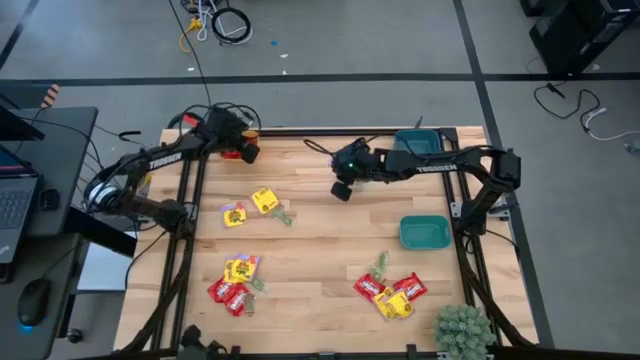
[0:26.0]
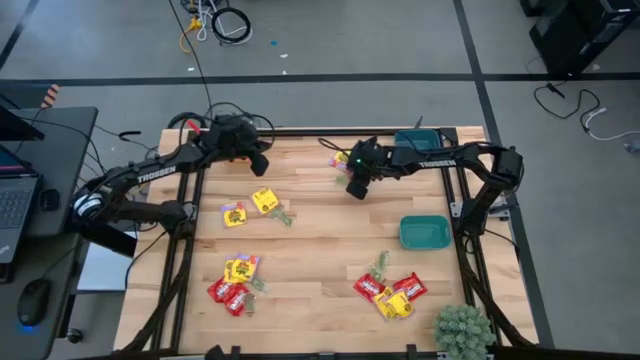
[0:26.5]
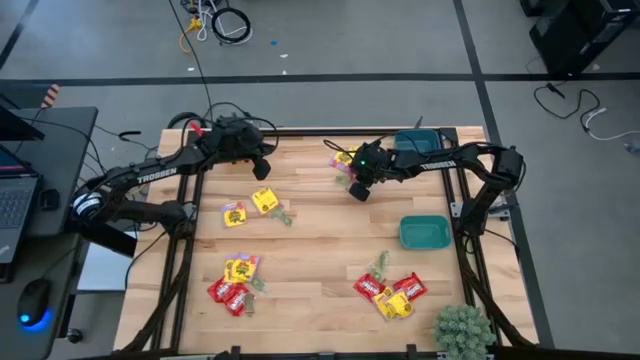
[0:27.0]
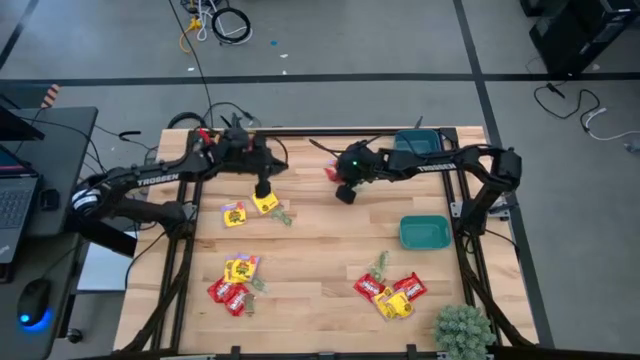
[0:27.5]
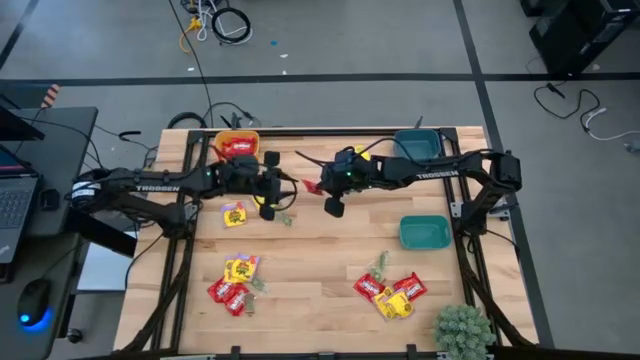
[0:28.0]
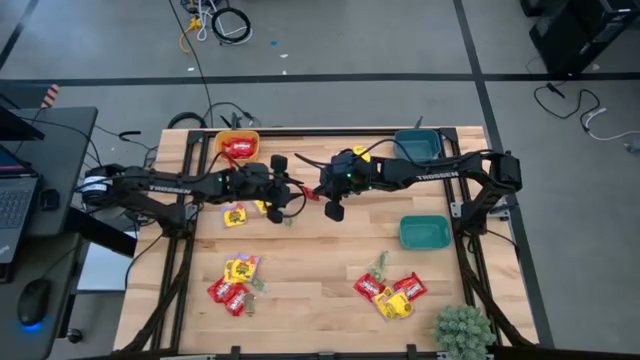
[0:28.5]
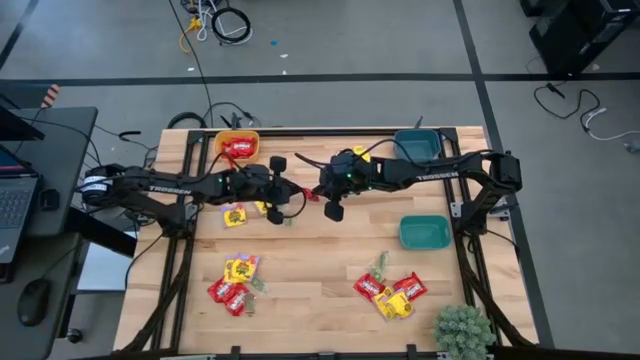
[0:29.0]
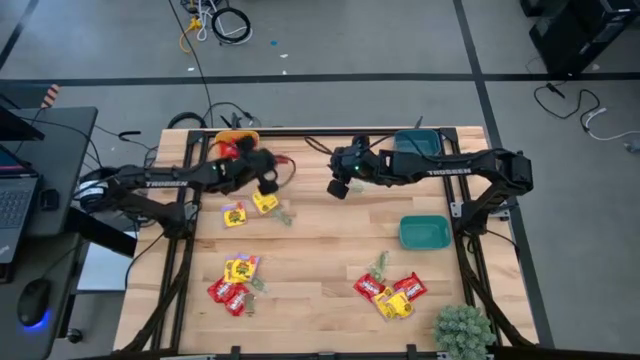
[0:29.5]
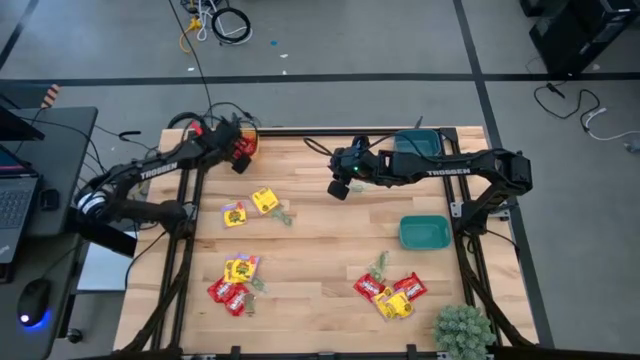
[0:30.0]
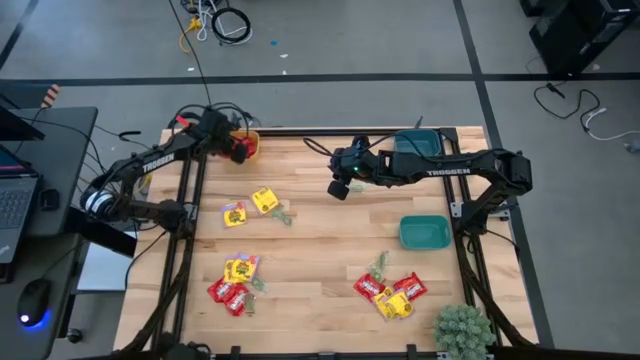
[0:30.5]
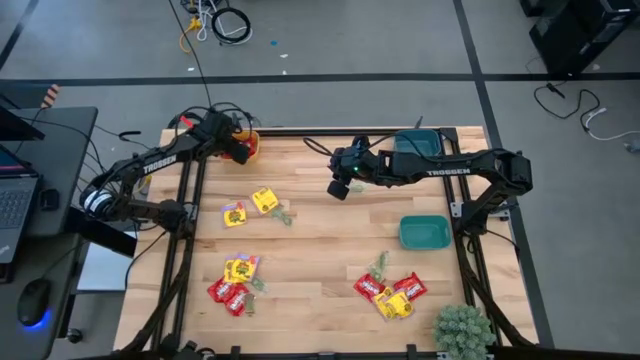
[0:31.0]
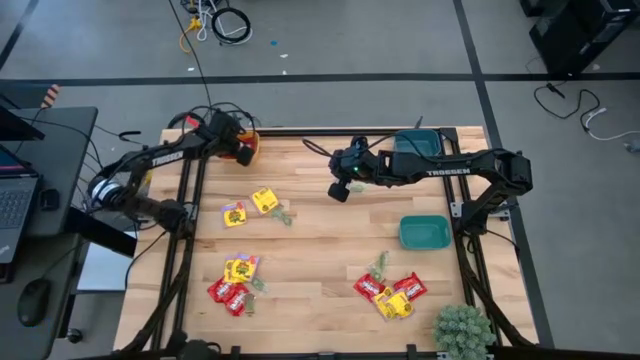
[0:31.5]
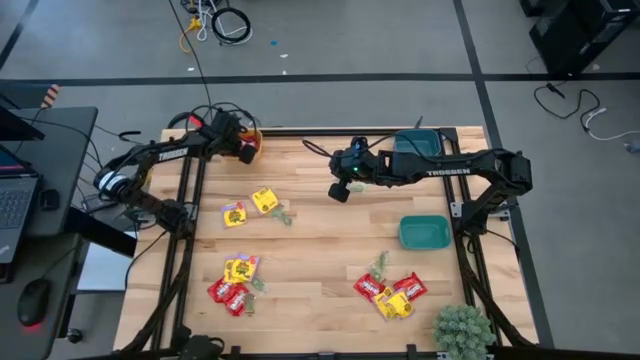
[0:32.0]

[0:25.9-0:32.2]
Task: Sort candy
Put the red candy into the yellow bin

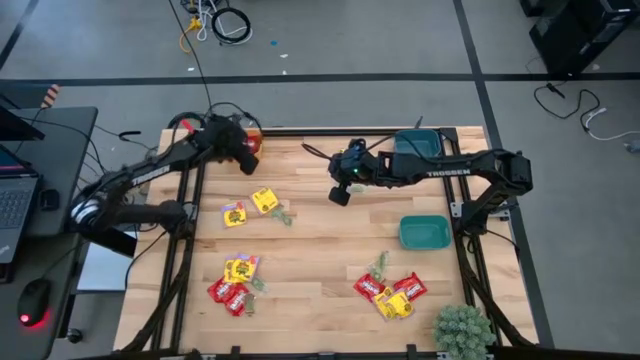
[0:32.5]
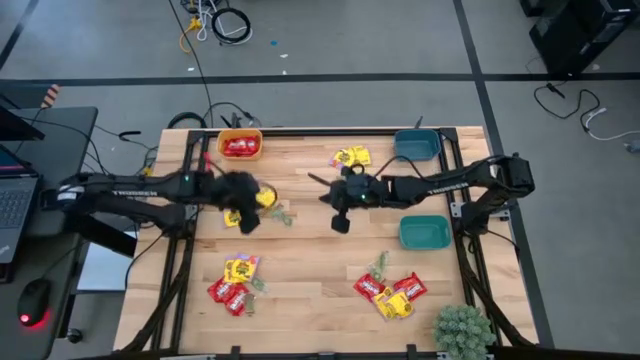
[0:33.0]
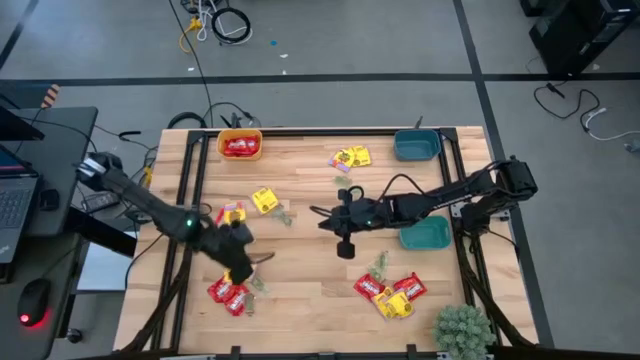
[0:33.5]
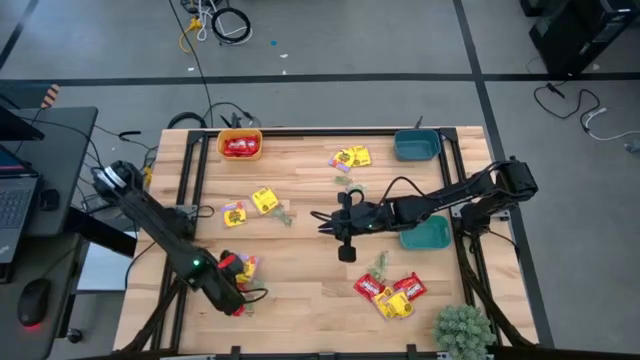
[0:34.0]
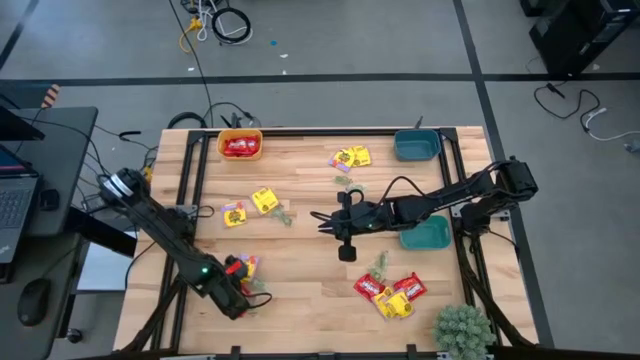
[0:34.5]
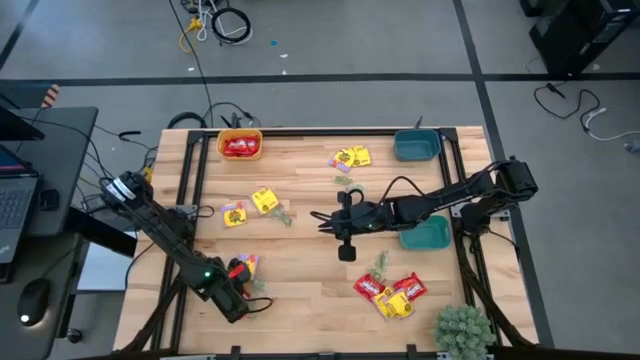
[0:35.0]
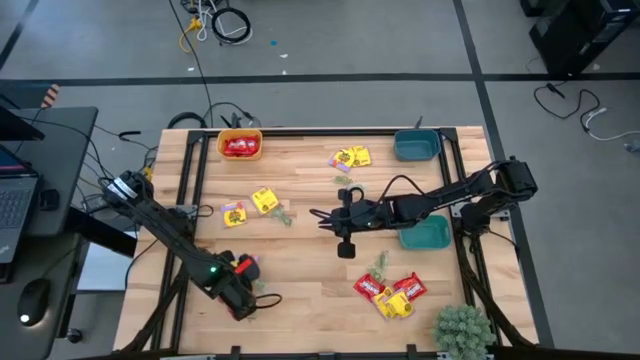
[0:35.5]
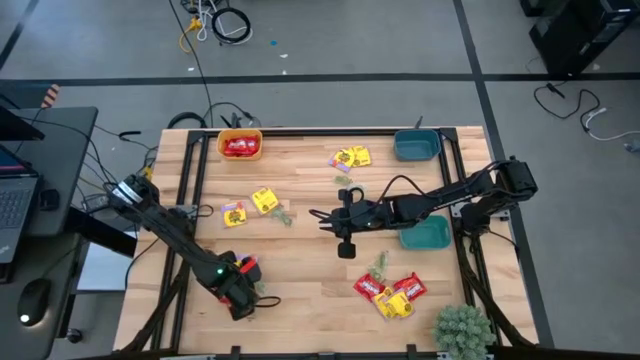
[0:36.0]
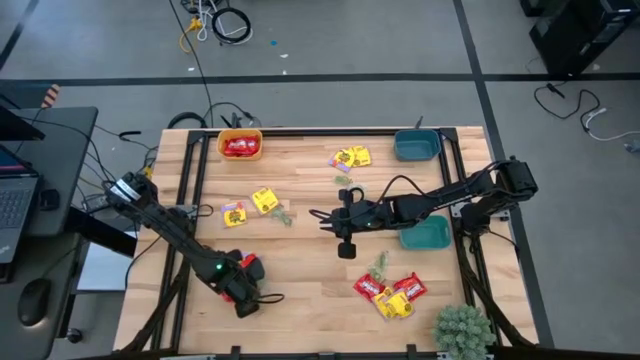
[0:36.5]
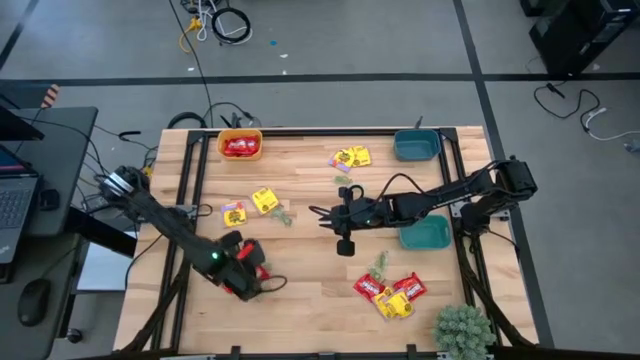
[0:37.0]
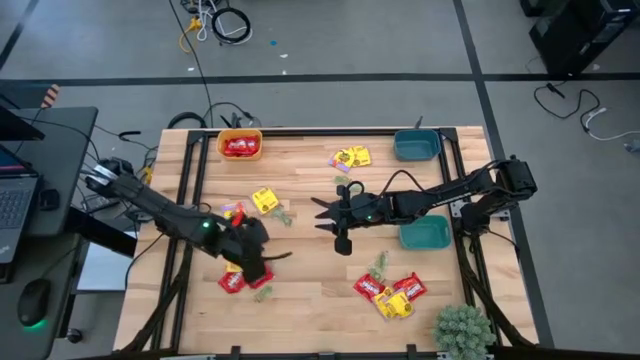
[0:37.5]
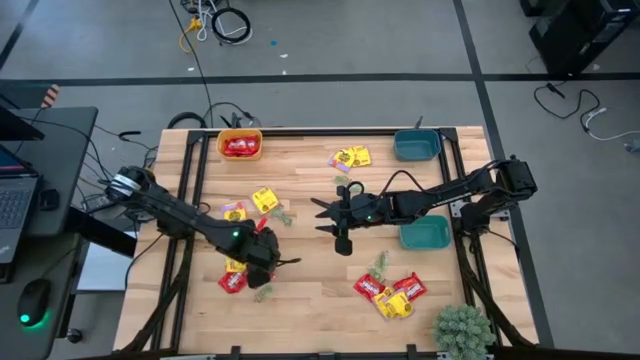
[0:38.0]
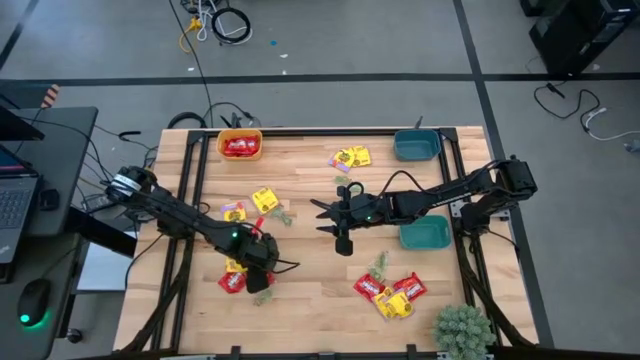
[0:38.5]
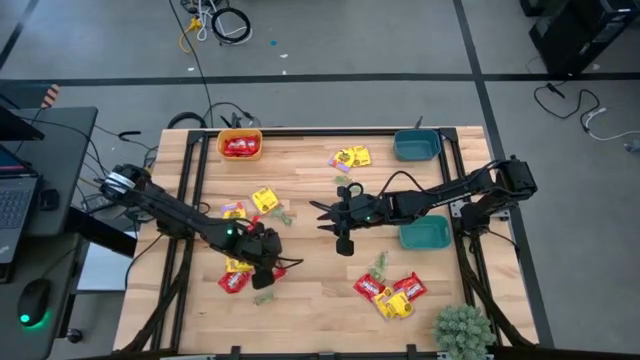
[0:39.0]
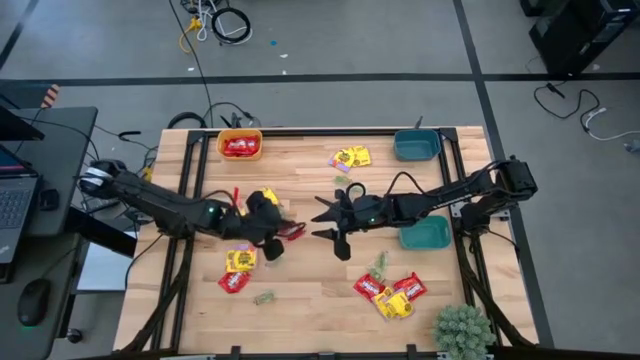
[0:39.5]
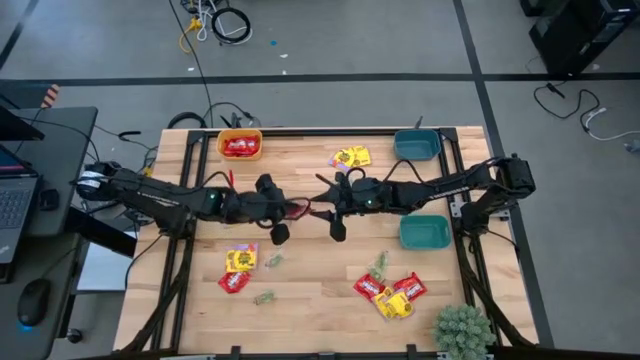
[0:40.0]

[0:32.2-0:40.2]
Put the red candy into the yellow bin

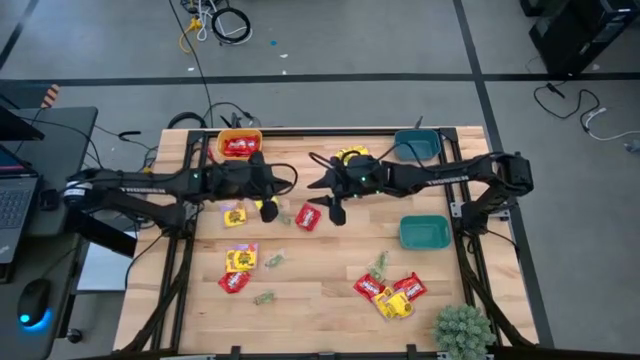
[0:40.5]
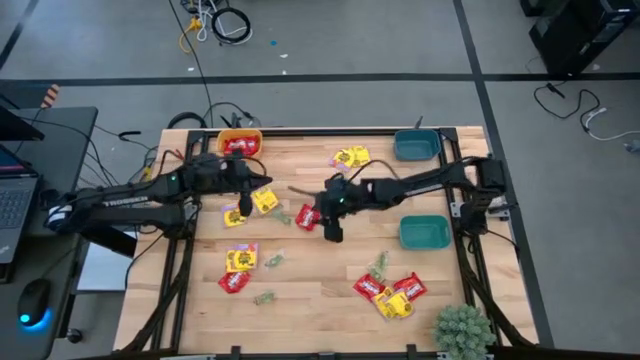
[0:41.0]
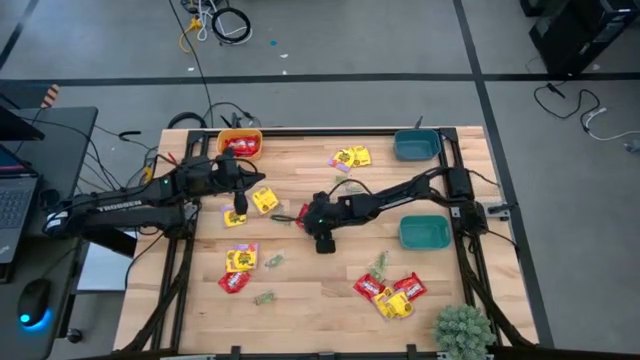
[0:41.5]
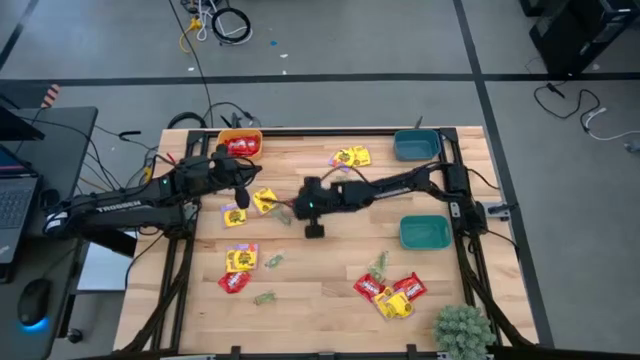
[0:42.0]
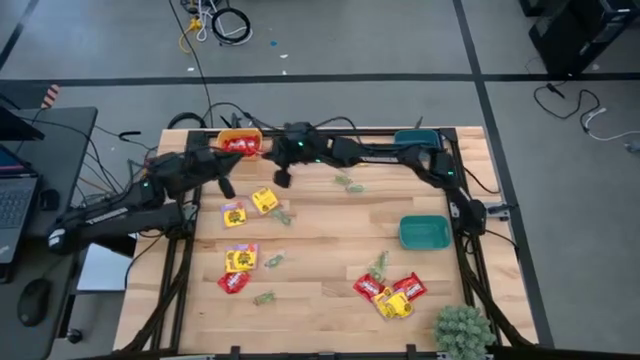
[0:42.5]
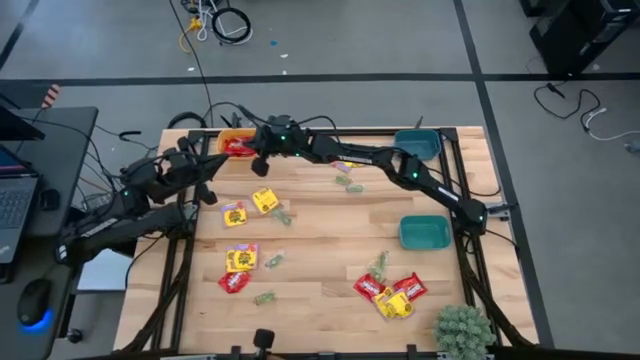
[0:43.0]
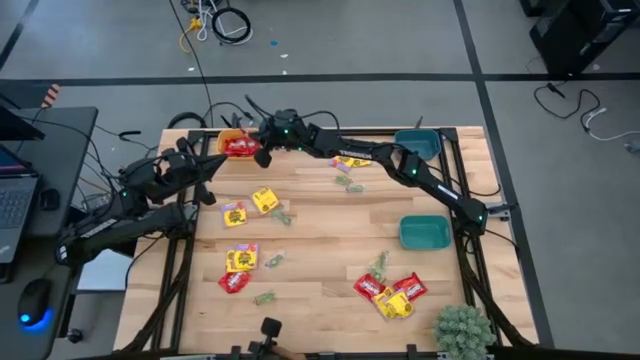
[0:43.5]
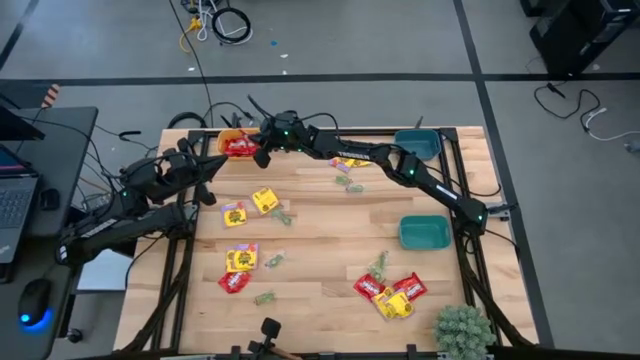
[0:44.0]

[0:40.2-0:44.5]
Put the red candy into the yellow bin

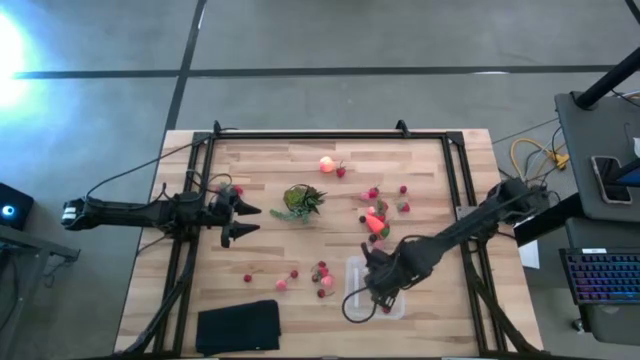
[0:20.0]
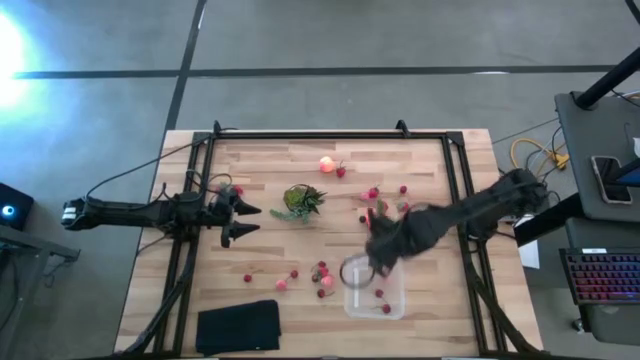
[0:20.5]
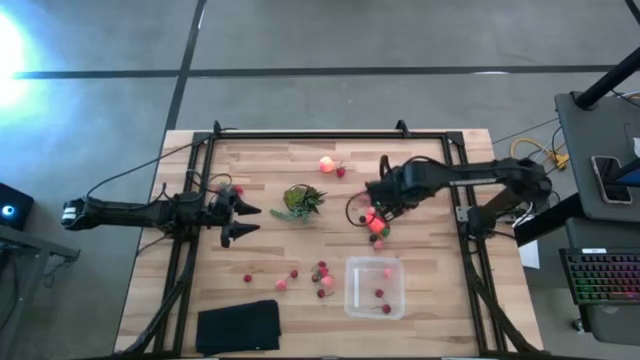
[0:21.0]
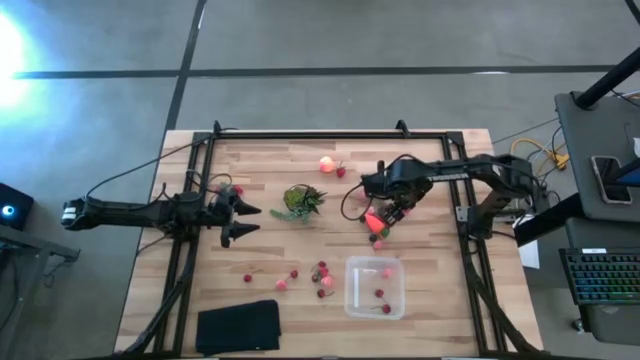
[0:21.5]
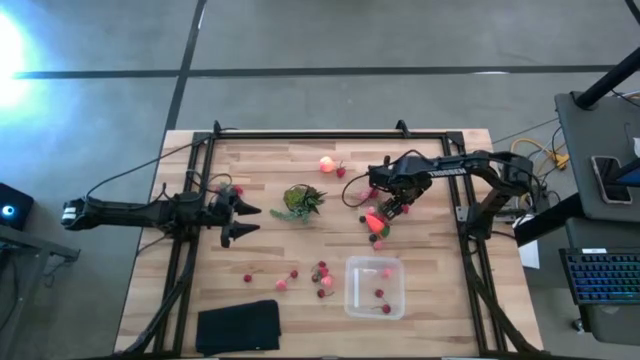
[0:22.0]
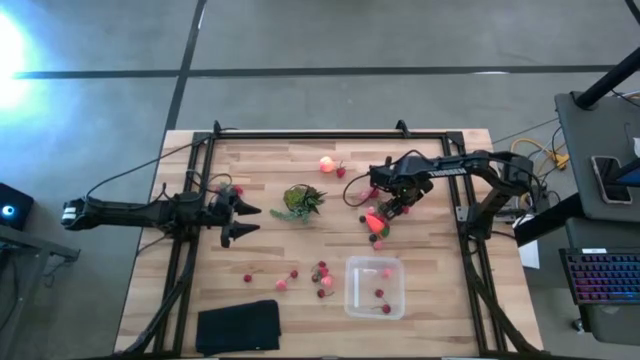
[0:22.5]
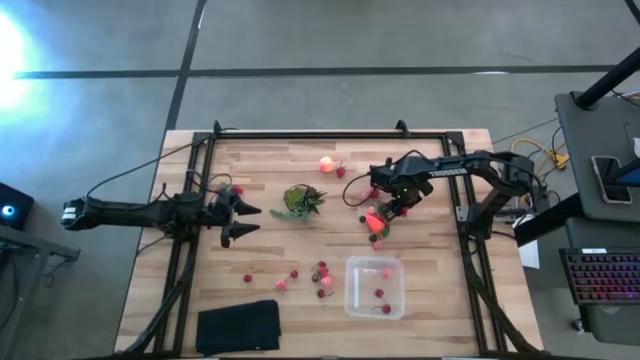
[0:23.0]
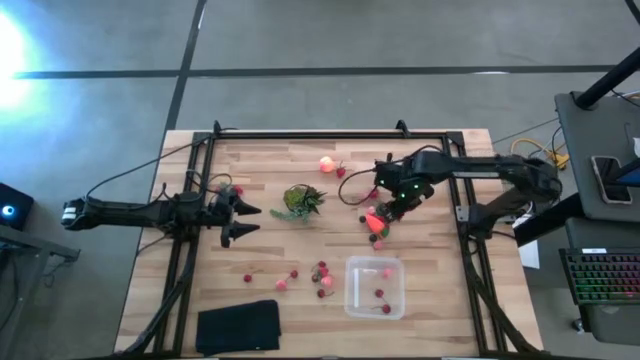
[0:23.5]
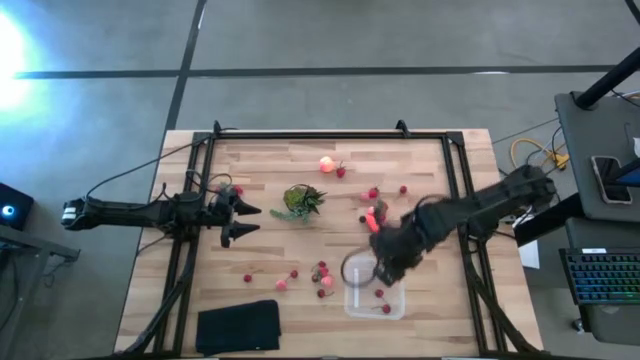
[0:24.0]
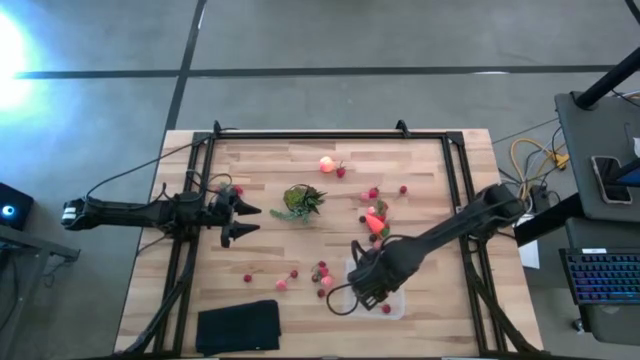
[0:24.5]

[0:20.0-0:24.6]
Task: Pick and placing Produce into tupperware
Put the strawberry into the bin
